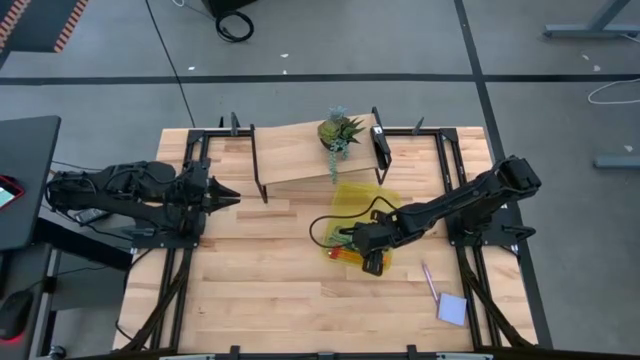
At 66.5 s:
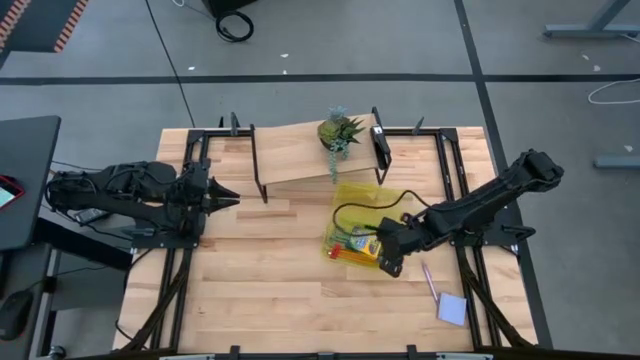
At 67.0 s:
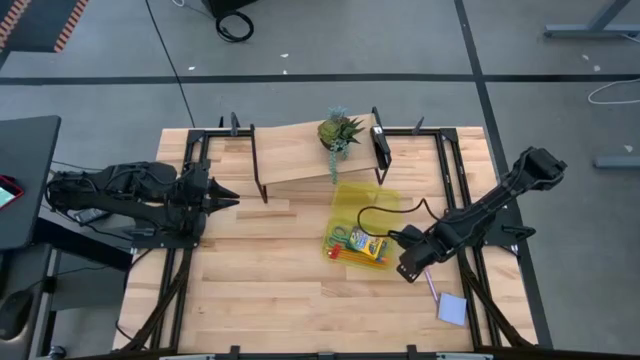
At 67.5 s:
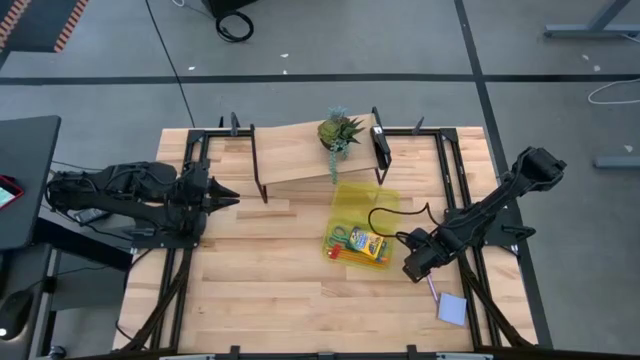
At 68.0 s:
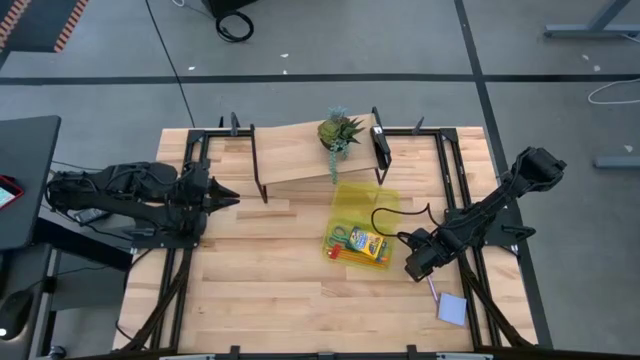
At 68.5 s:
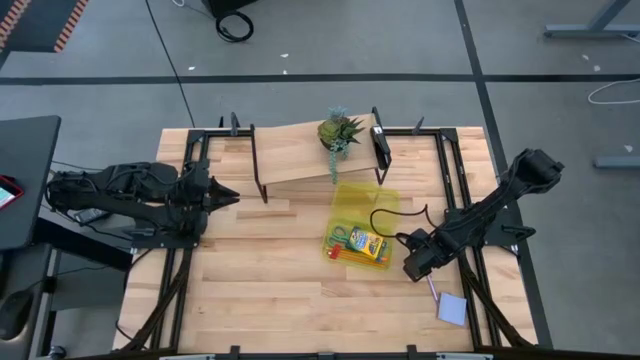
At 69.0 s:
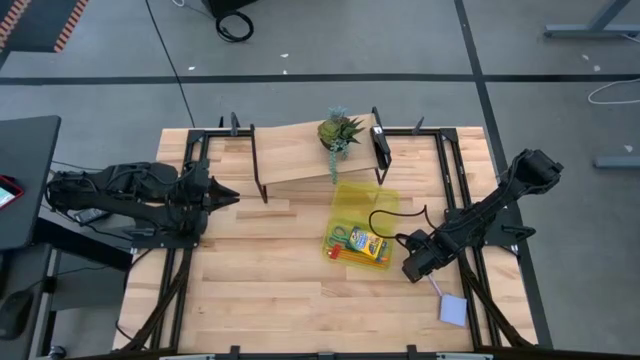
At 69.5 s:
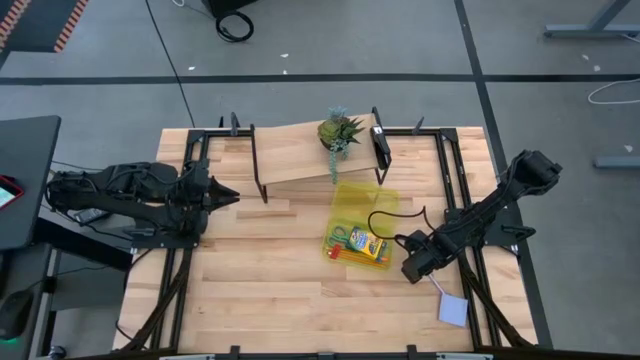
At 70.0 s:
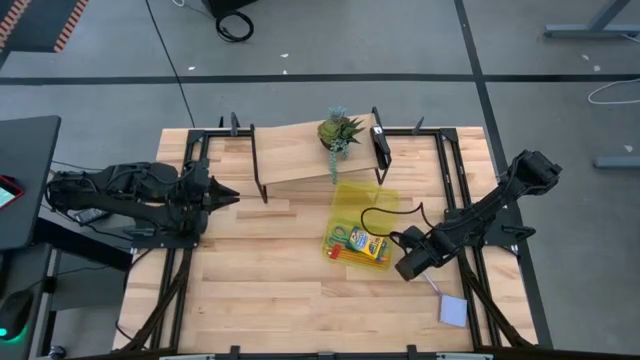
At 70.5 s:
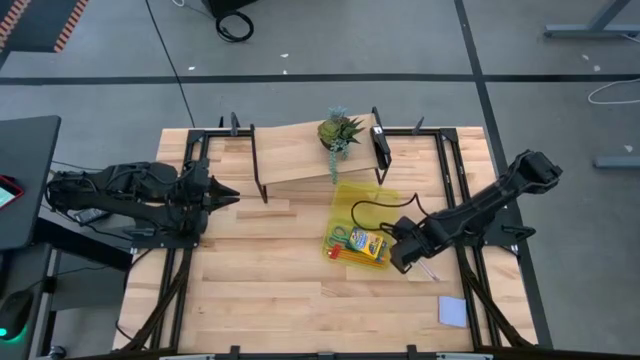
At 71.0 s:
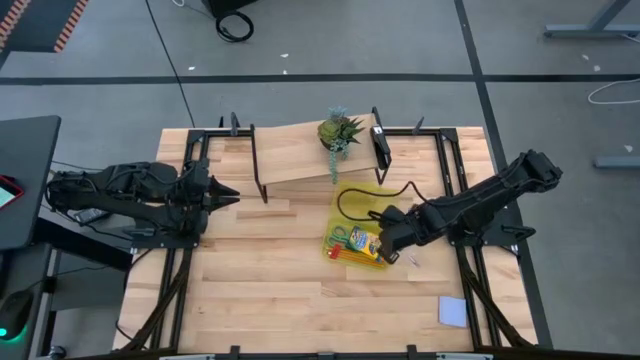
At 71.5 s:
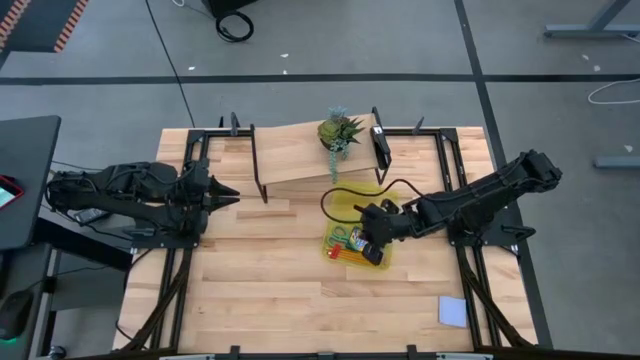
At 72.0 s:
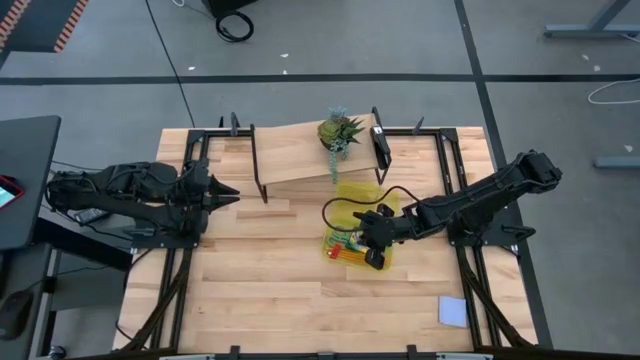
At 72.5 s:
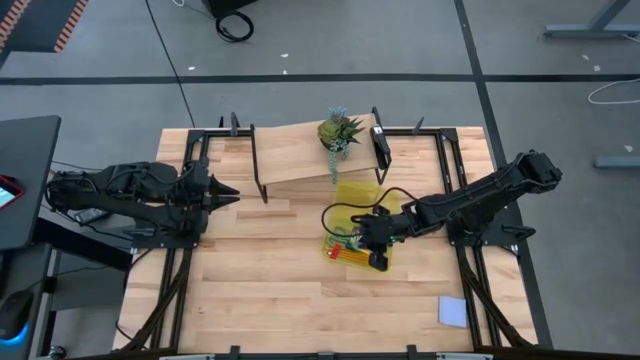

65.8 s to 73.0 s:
Task: Pack school essentials
Put the pink pen into the yellow supply box

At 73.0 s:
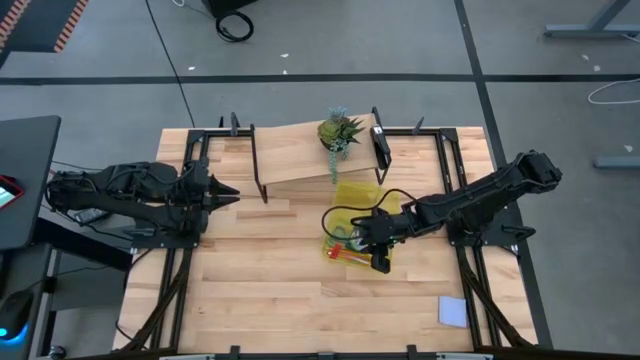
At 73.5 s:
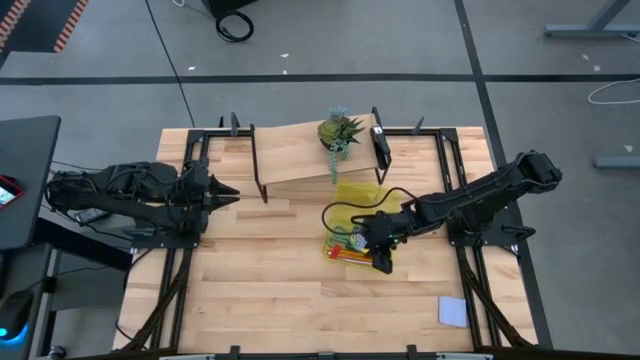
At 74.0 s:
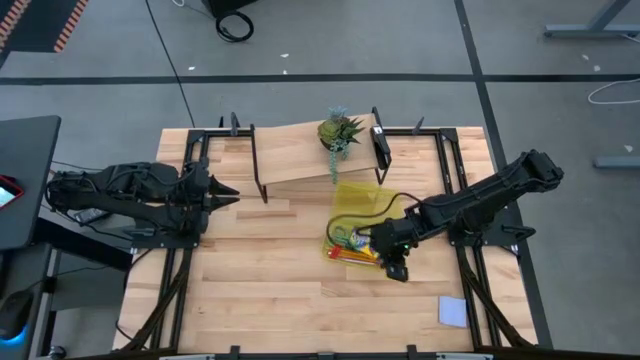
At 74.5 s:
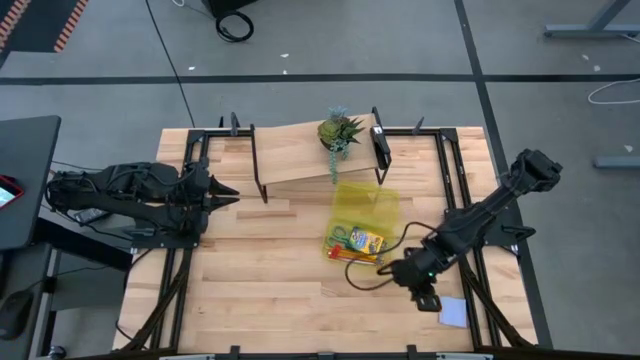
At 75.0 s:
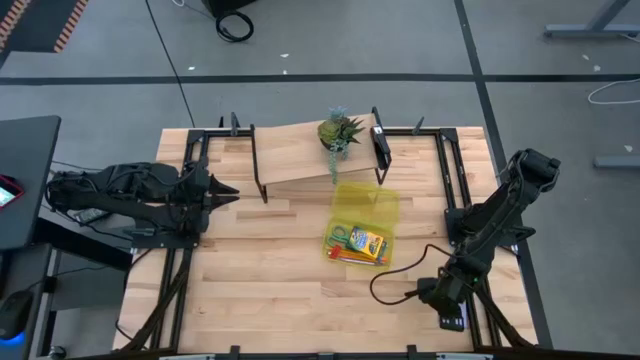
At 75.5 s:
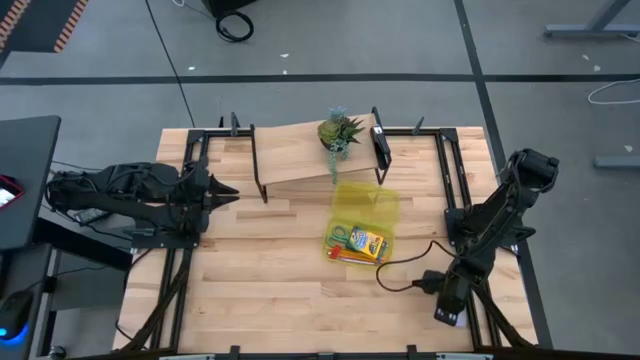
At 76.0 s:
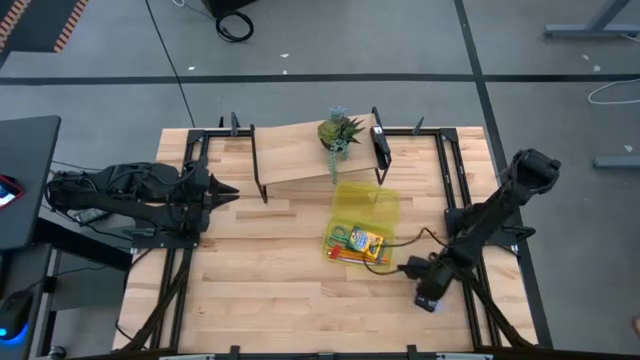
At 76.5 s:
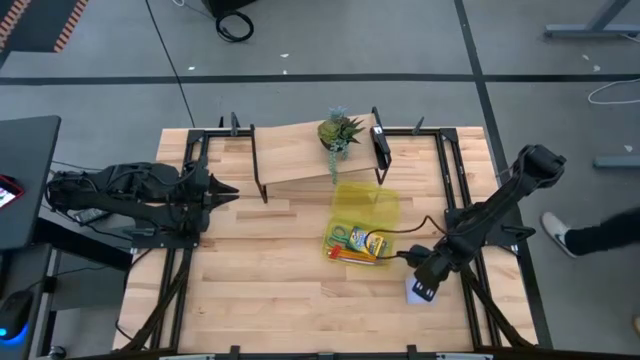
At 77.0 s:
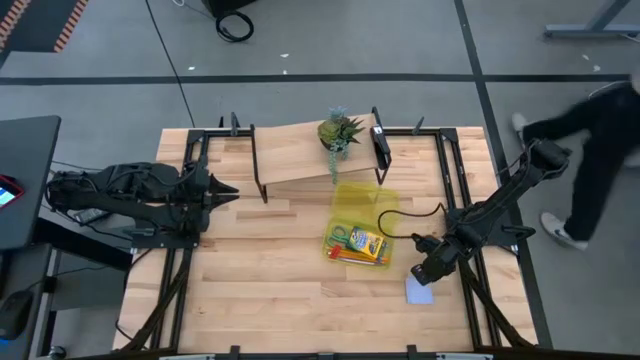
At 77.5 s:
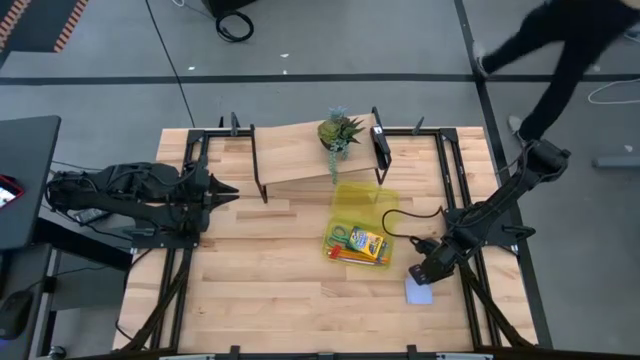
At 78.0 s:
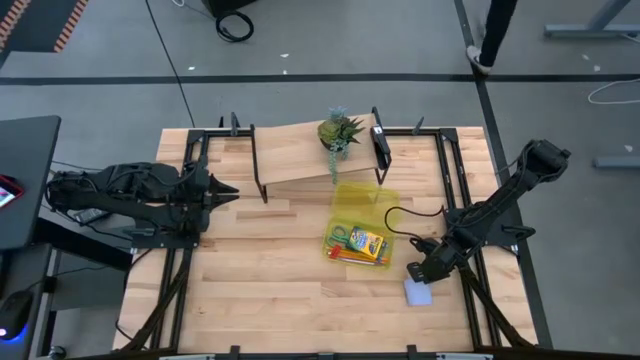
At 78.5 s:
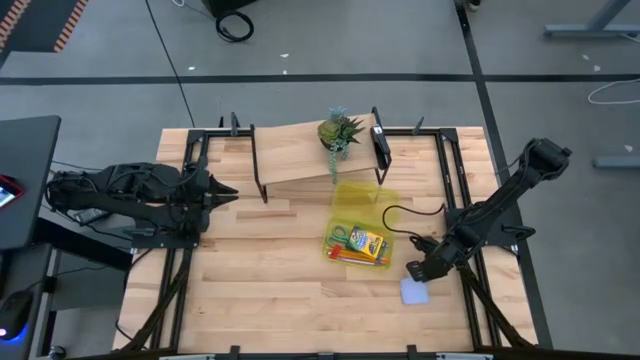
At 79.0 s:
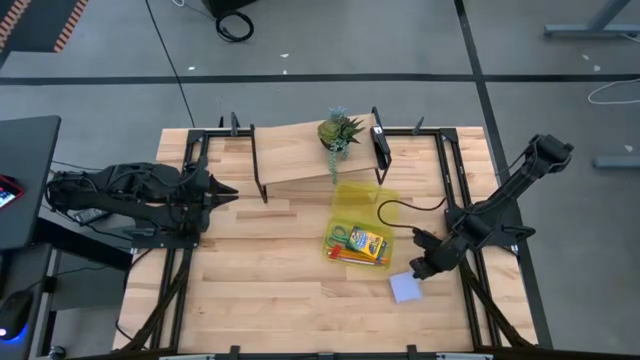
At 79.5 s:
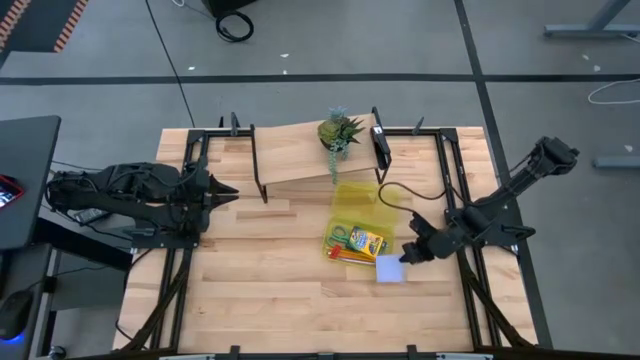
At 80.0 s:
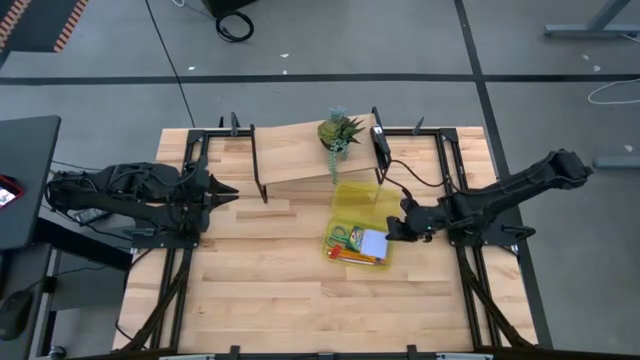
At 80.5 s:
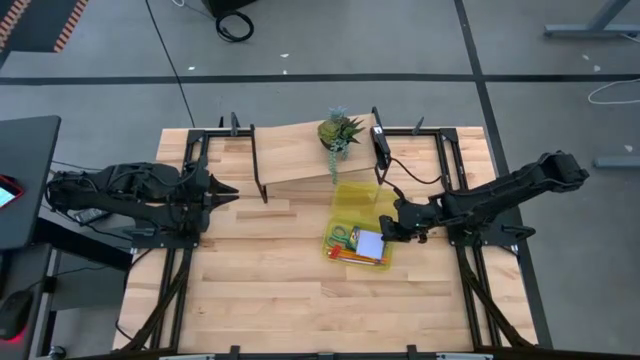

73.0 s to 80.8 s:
Put the purple sticky notes into the yellow supply box

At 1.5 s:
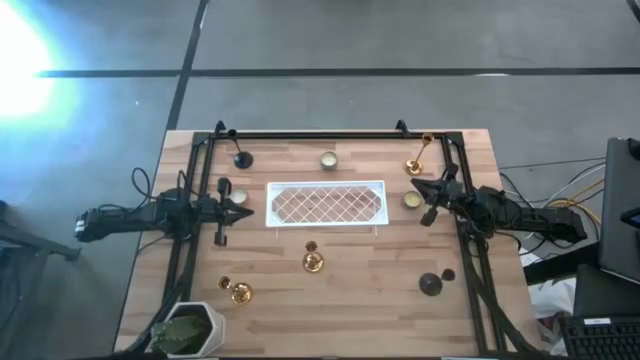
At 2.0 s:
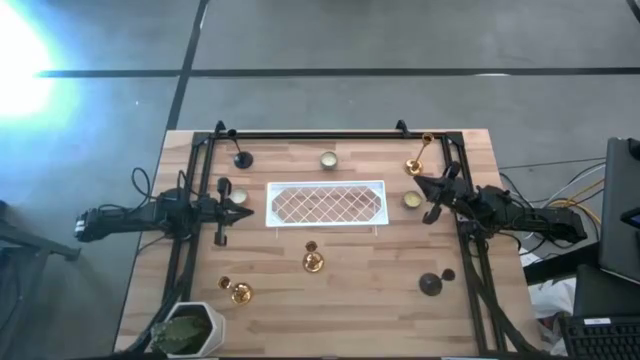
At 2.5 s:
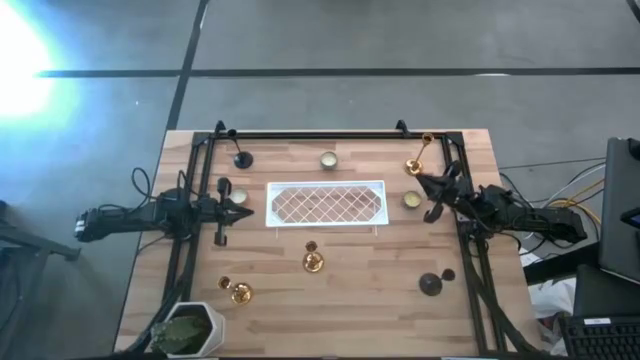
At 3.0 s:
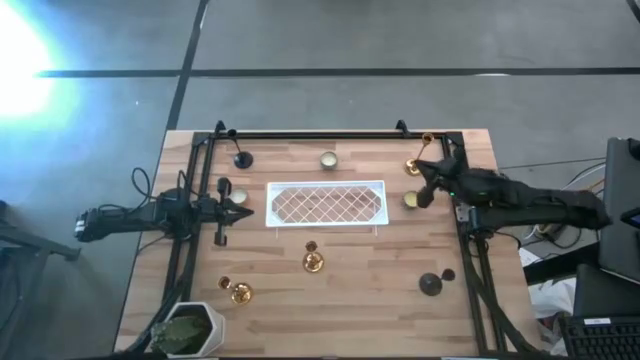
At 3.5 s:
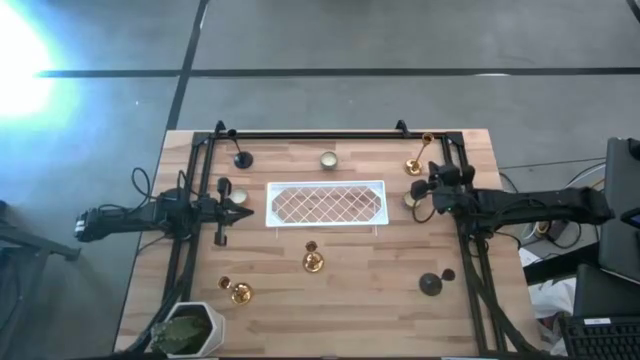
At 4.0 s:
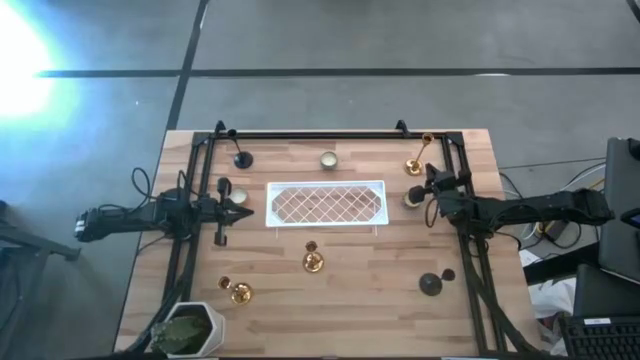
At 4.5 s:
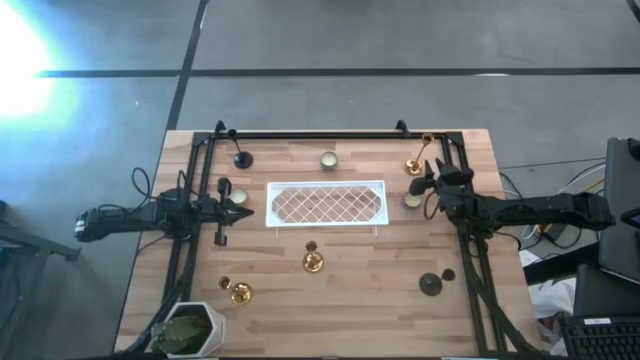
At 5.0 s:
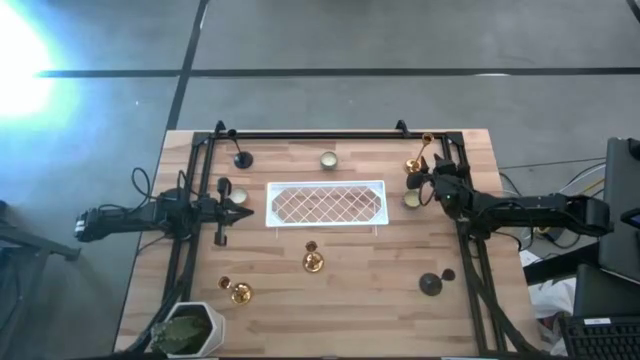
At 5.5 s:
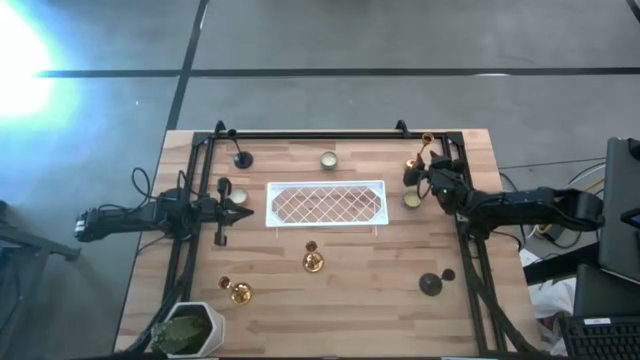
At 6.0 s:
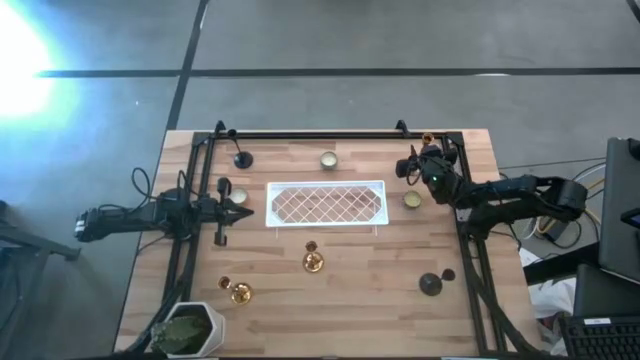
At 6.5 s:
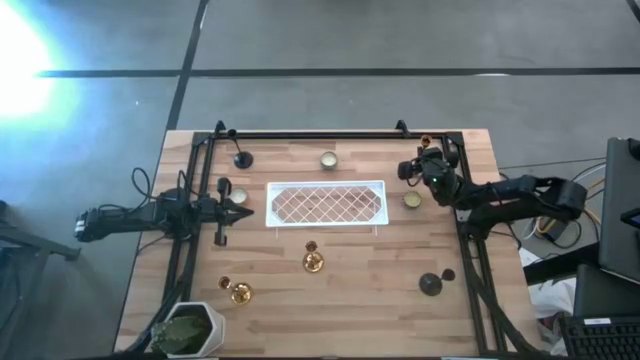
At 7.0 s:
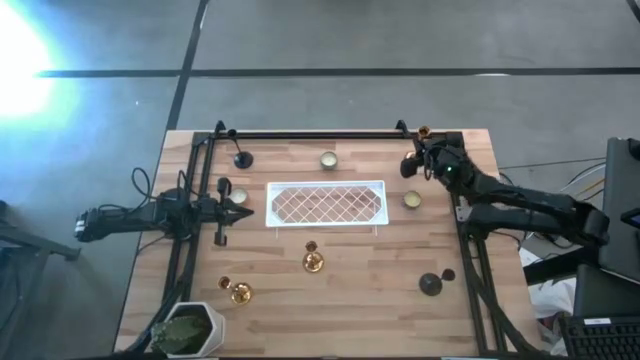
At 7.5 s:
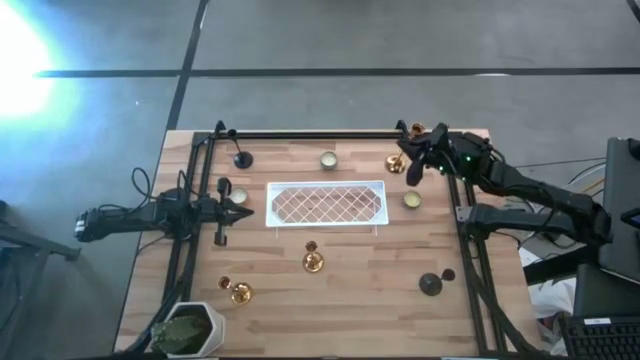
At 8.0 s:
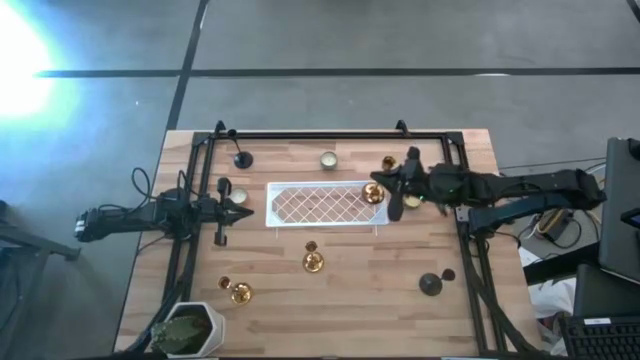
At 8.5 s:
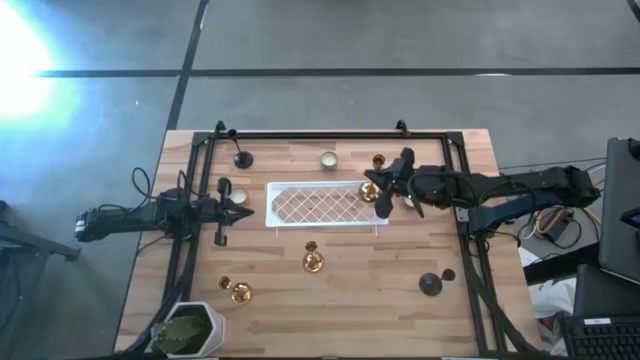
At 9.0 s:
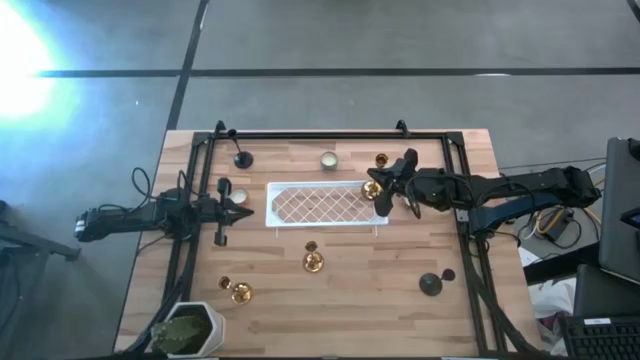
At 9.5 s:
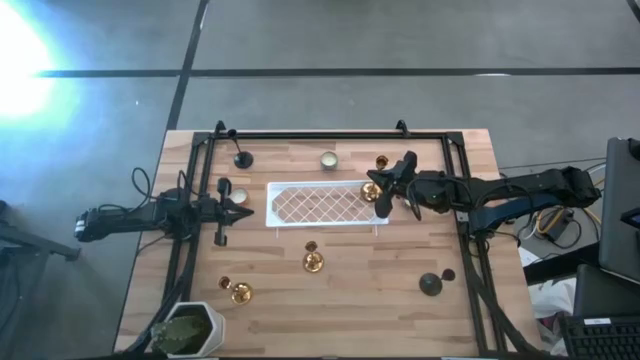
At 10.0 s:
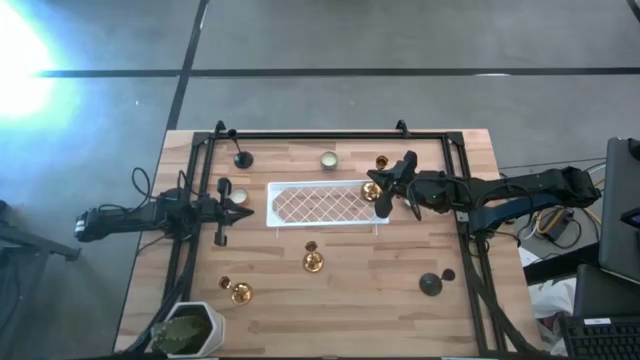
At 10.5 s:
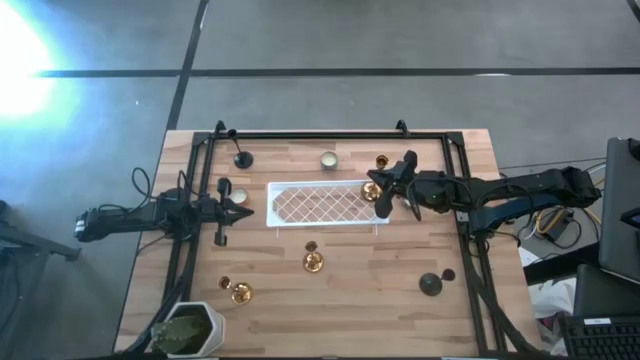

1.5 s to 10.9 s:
Task: Pick & Place candle stick holders
Put the top golden candle holder on the shelf
